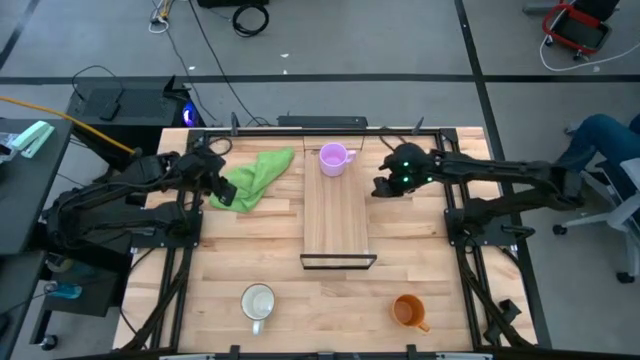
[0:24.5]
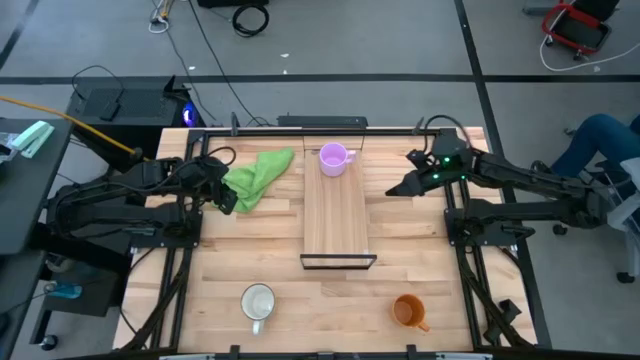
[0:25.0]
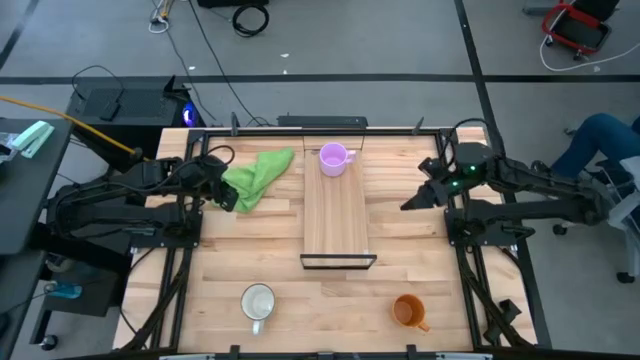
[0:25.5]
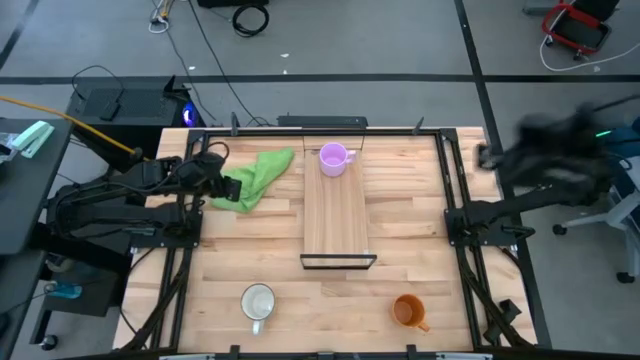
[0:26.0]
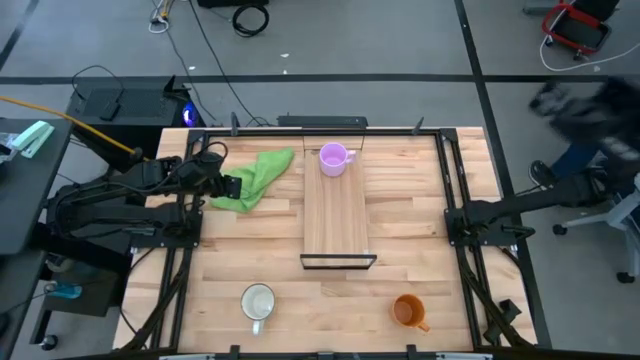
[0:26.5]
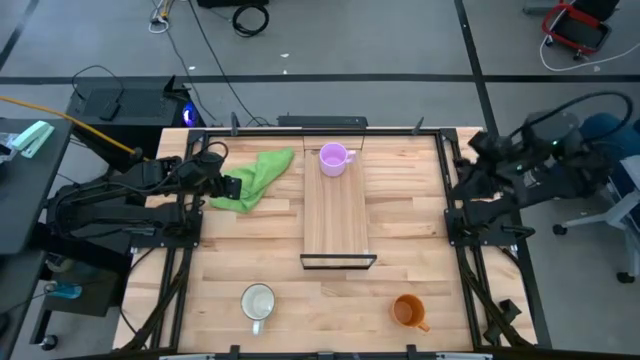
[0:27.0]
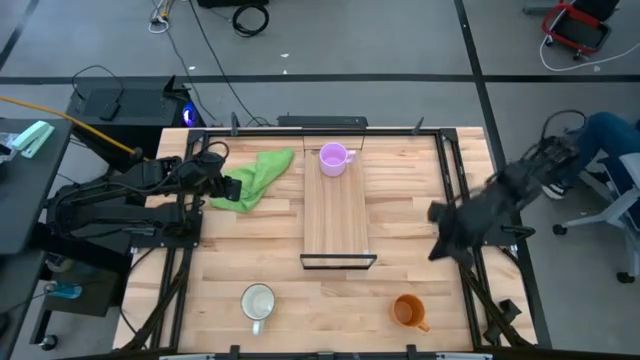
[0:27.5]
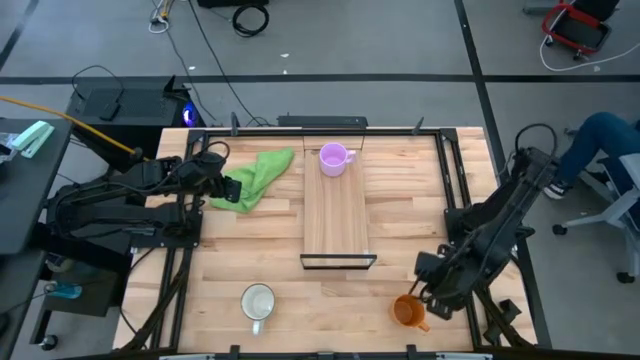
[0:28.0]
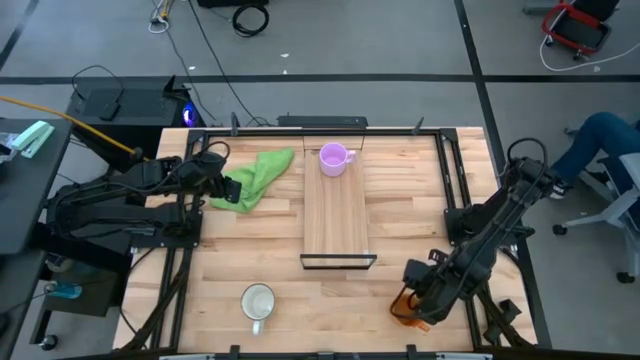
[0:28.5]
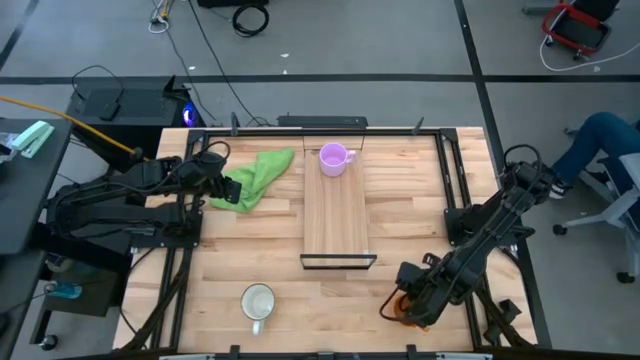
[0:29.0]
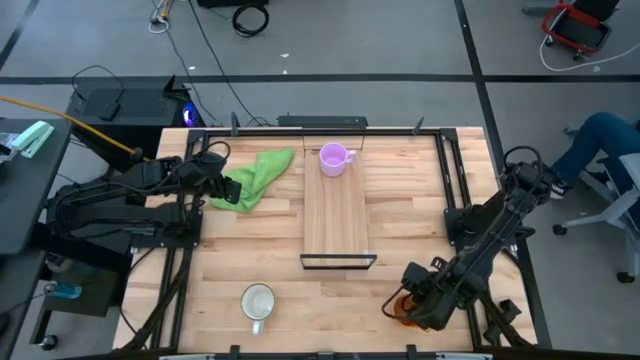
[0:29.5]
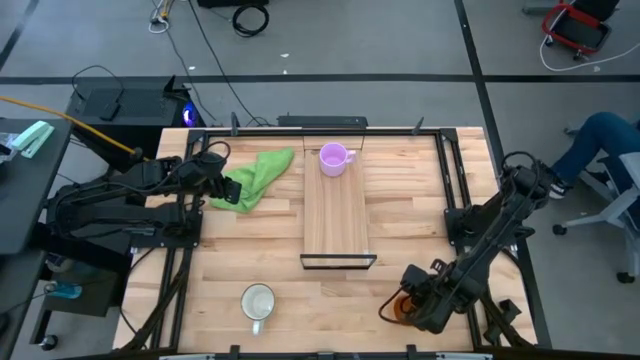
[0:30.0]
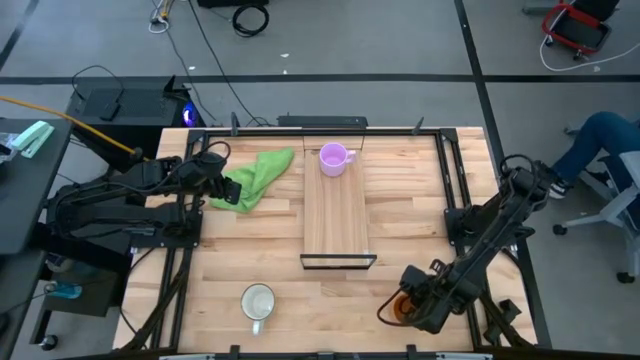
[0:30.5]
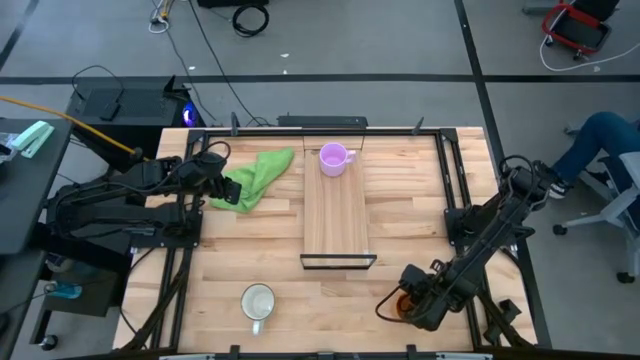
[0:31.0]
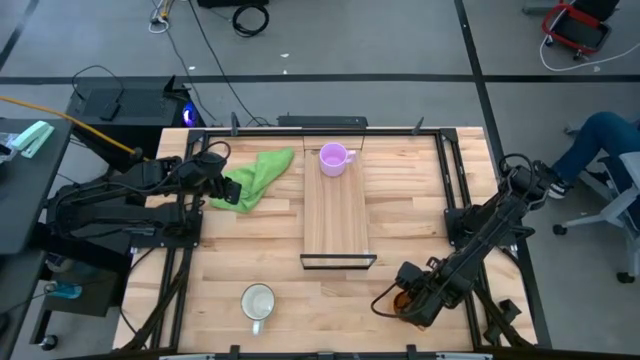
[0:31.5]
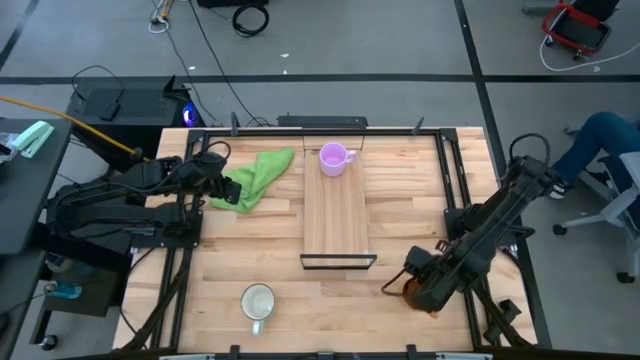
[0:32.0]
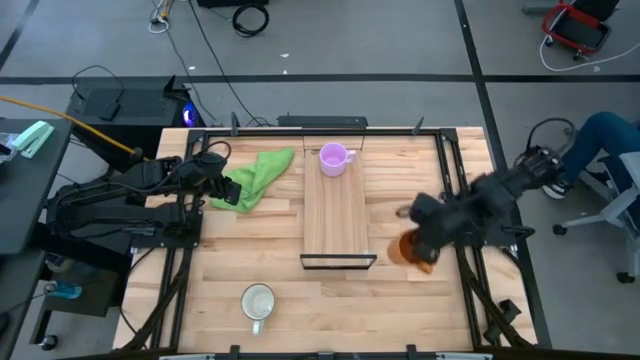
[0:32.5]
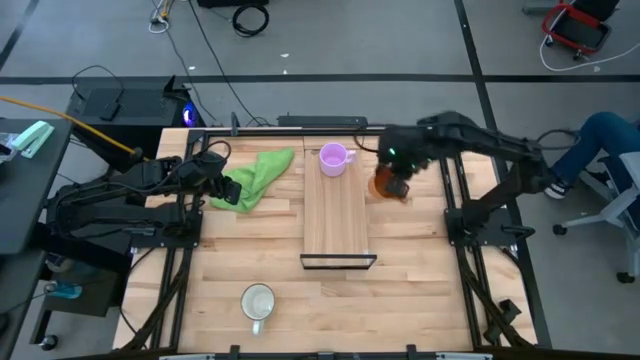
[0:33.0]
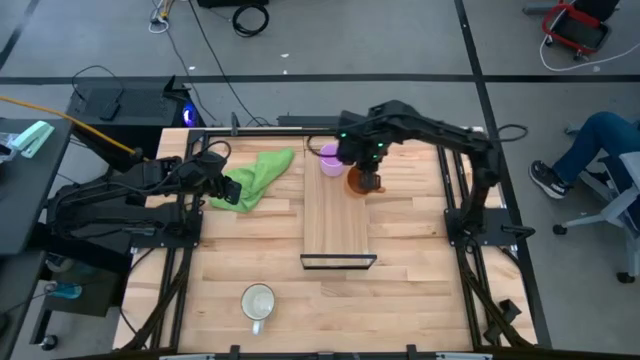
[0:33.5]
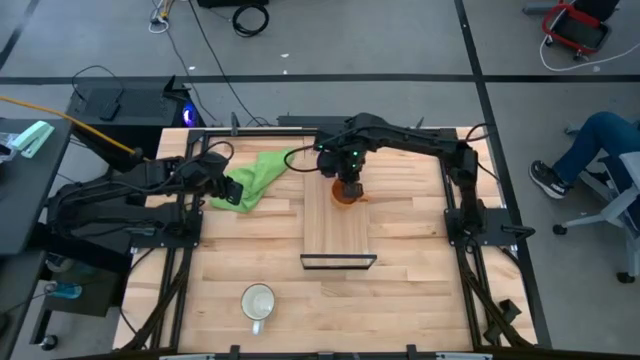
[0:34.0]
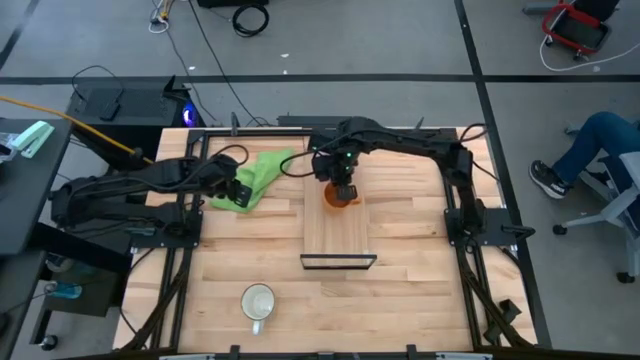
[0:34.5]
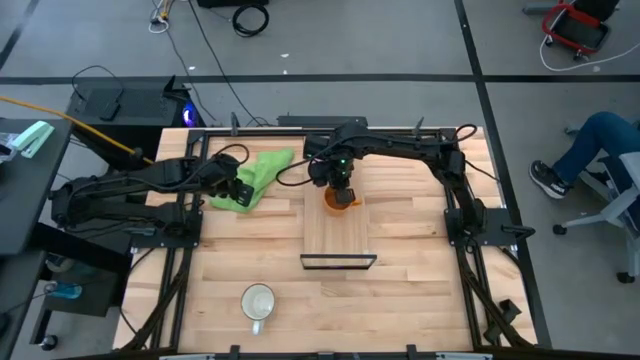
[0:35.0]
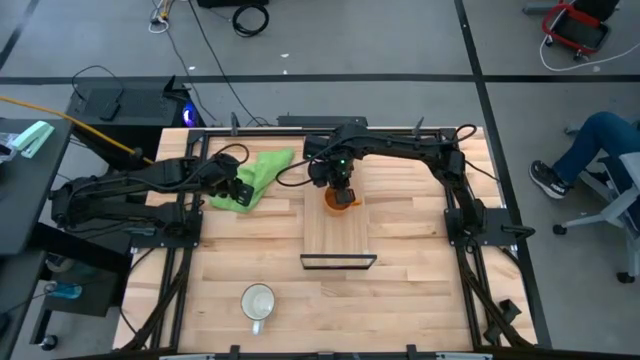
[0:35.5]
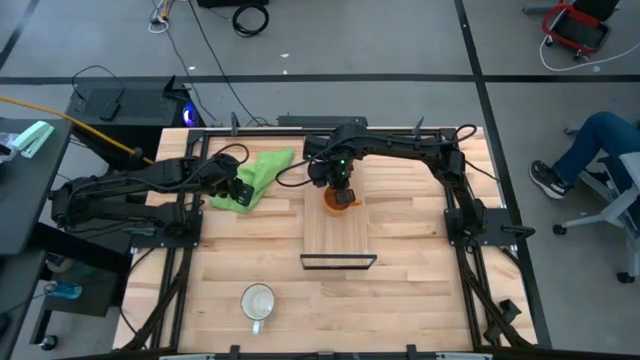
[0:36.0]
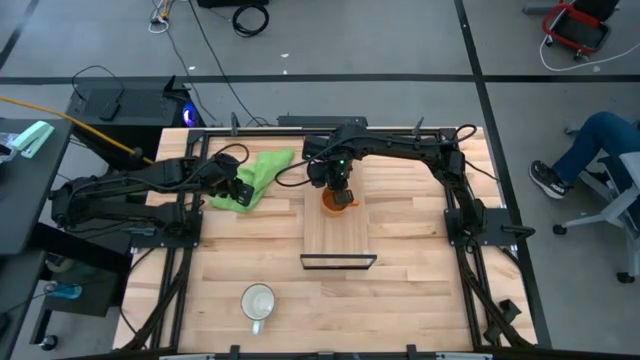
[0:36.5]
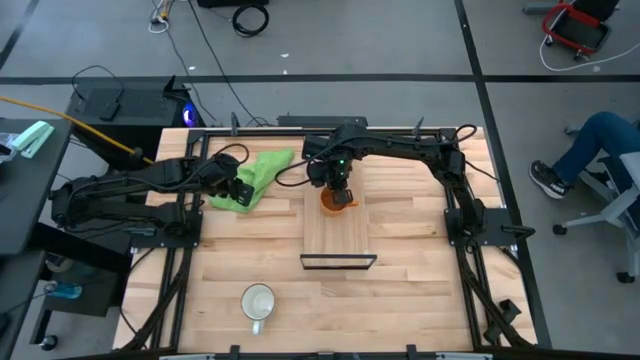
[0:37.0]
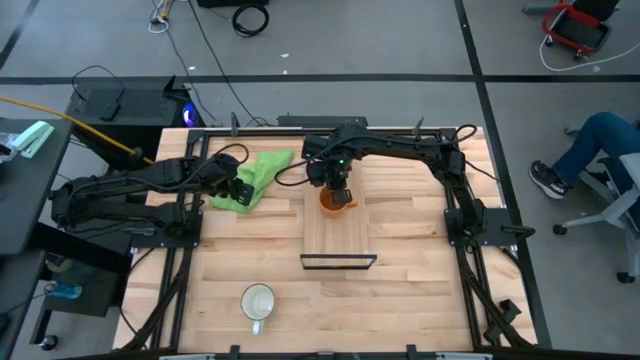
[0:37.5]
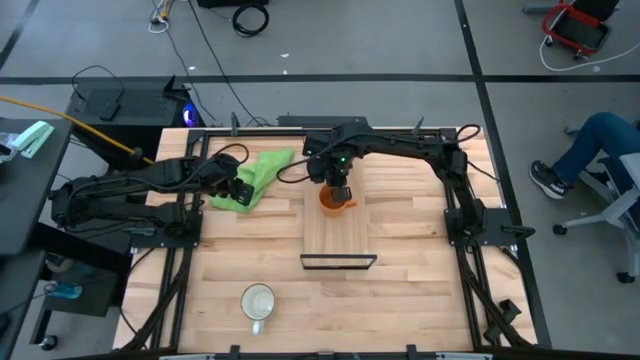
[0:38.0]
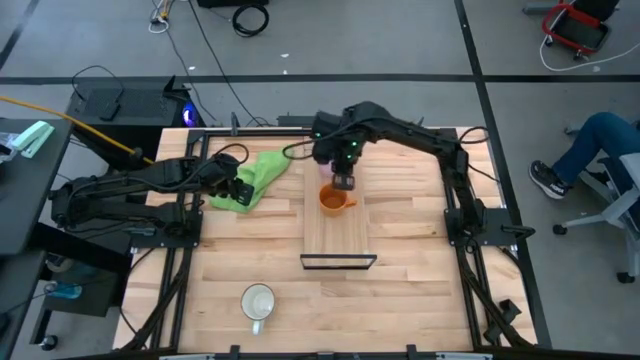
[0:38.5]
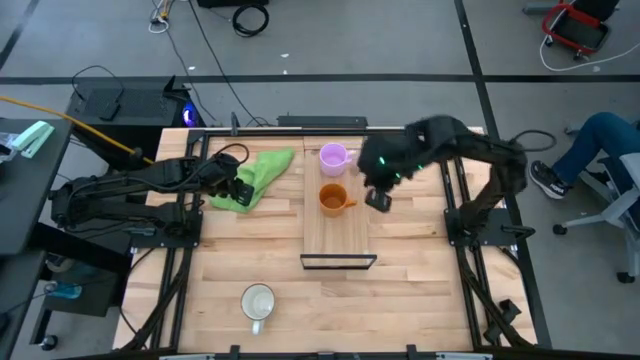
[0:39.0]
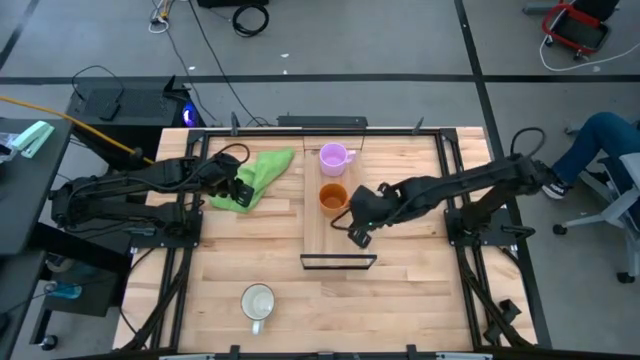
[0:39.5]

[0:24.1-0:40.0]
Task: Stack small to large cups/mugs on shelf
Put the orange mug on the shelf

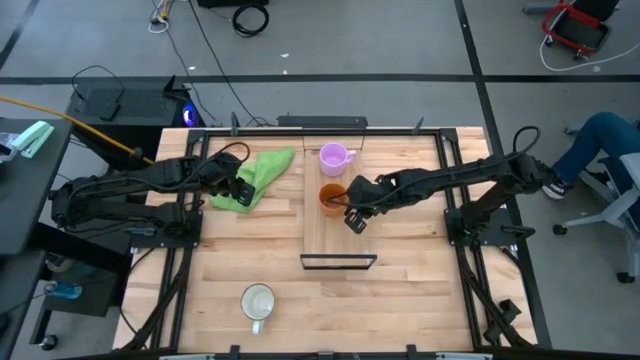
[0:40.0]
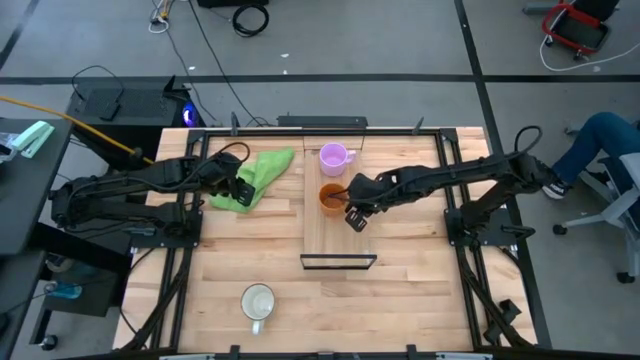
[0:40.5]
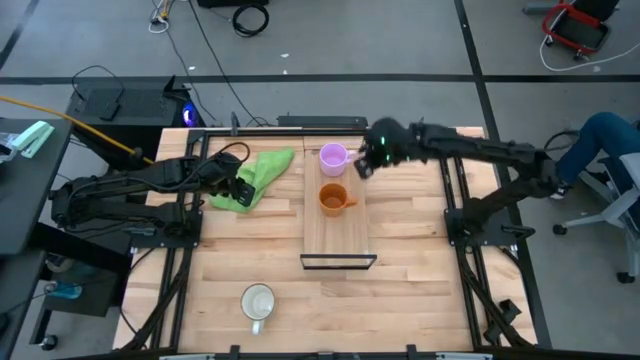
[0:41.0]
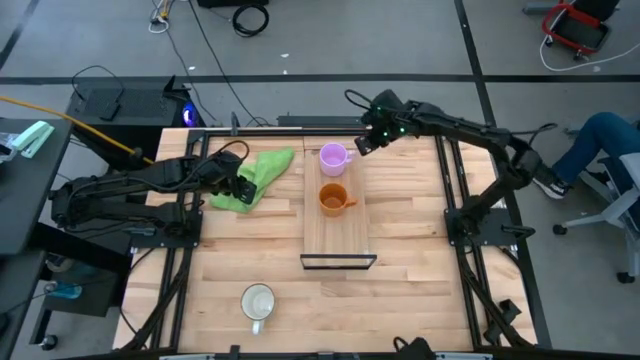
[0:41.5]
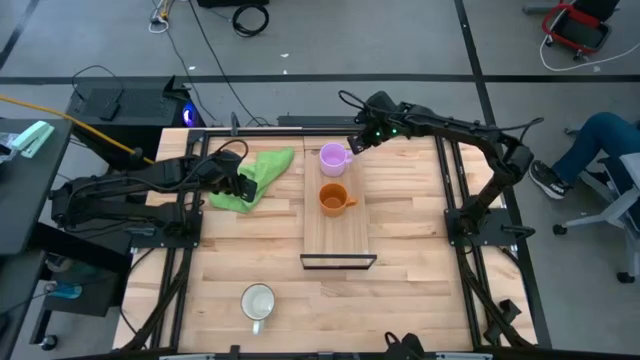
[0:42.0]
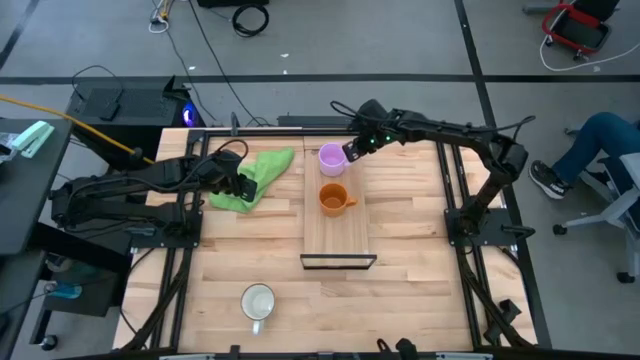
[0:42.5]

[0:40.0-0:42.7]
Adjust the pink mug on the shelf

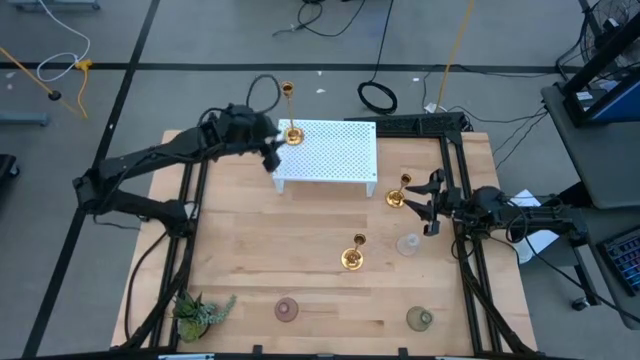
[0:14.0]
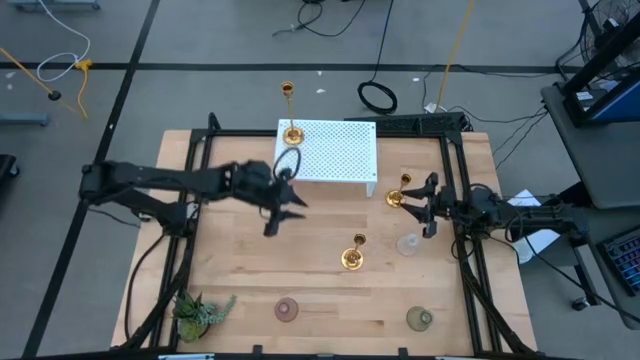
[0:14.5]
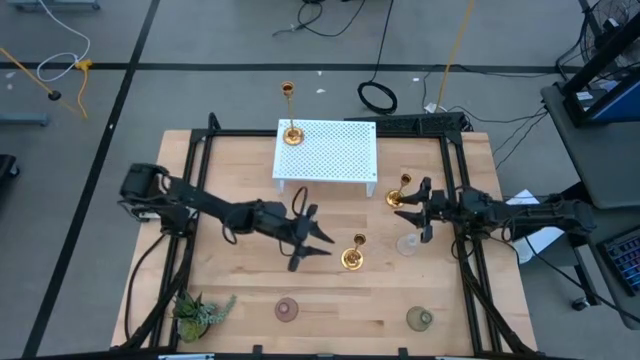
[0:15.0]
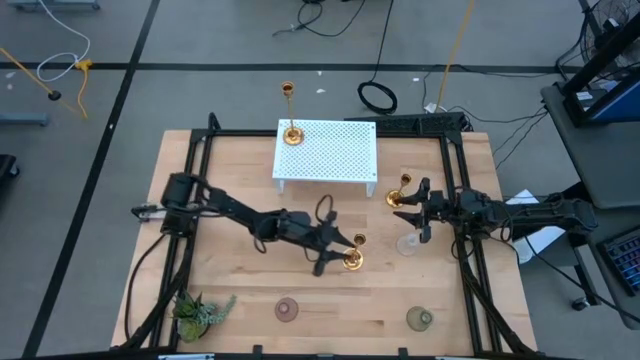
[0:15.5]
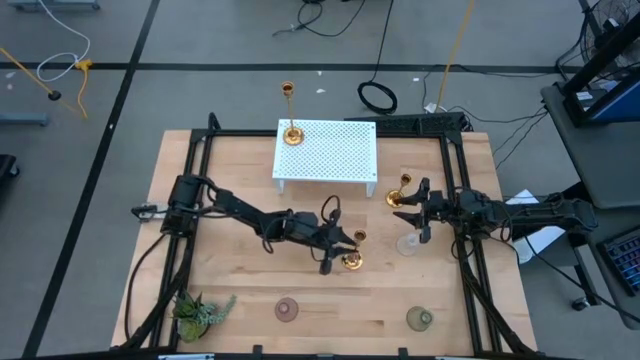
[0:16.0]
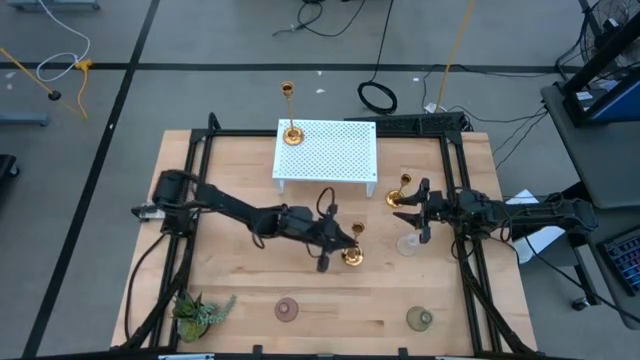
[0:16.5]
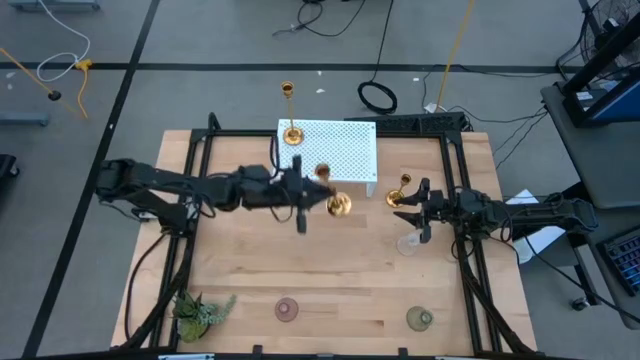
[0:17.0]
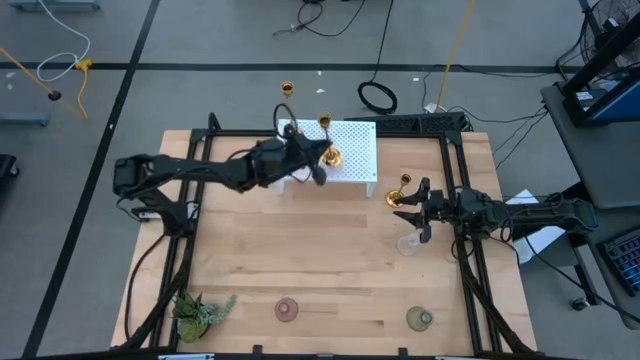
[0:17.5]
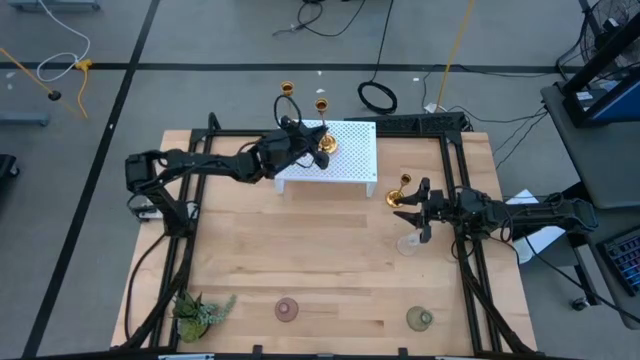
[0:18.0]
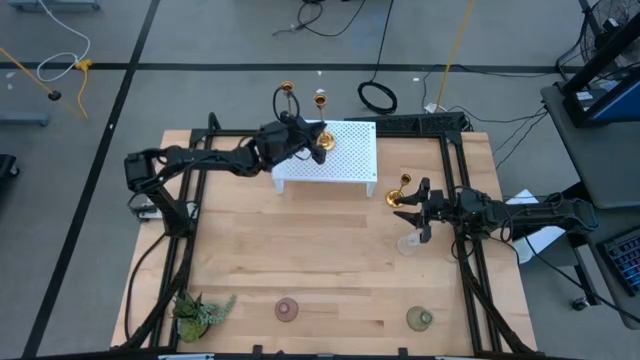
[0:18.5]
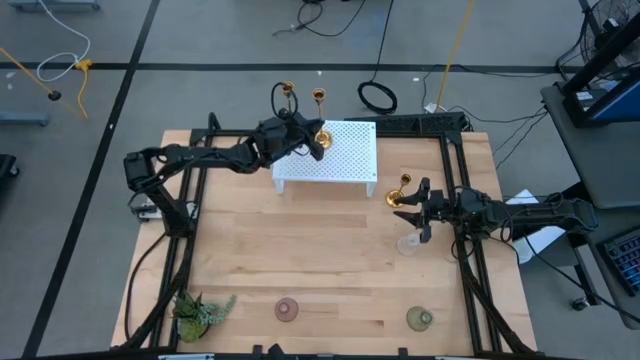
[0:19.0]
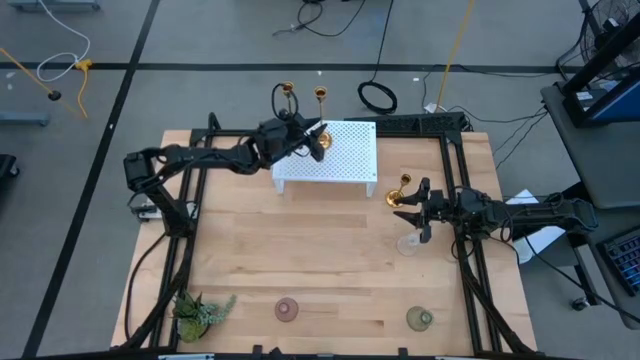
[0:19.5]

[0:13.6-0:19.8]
Task: Pick & Place candle stick holders
Put the middle center golden candle holder on the shelf
